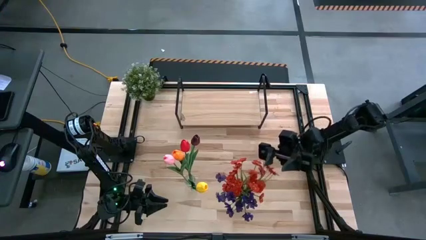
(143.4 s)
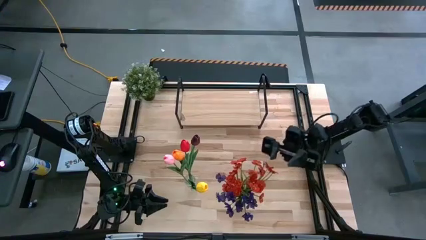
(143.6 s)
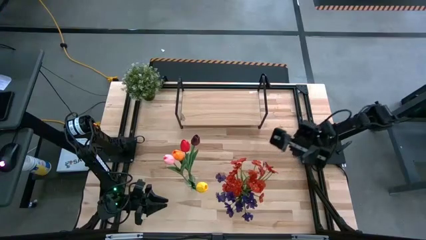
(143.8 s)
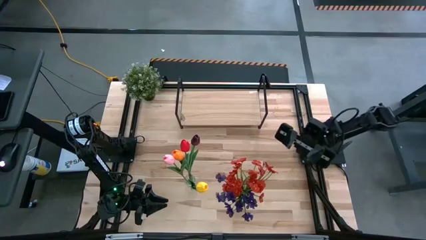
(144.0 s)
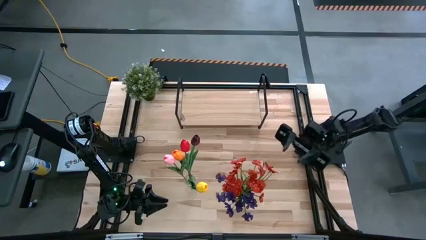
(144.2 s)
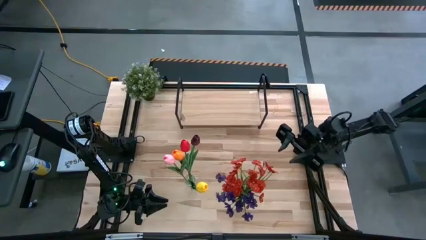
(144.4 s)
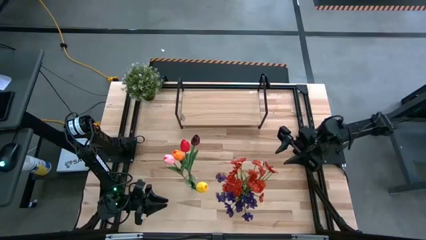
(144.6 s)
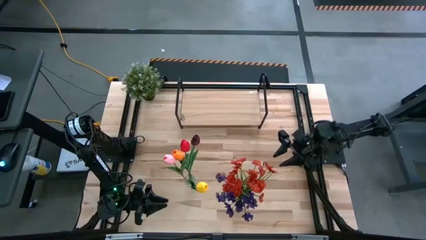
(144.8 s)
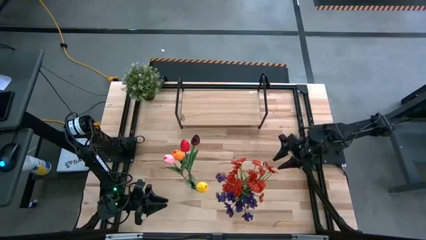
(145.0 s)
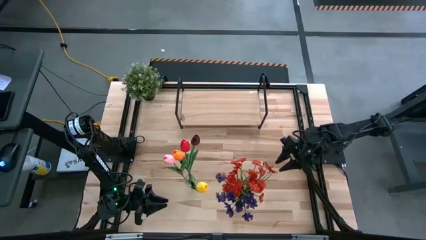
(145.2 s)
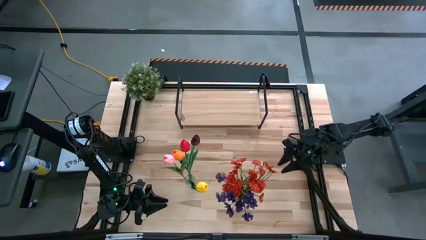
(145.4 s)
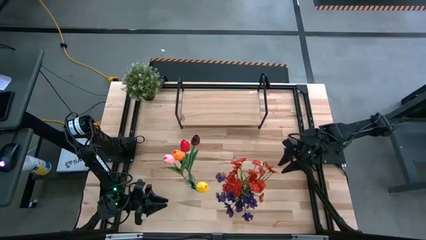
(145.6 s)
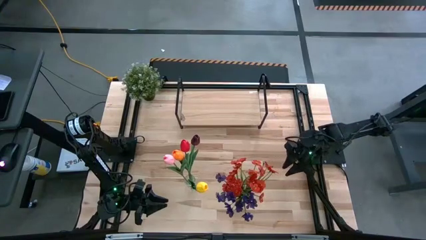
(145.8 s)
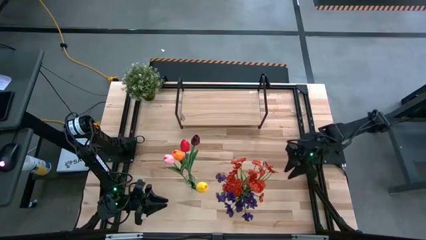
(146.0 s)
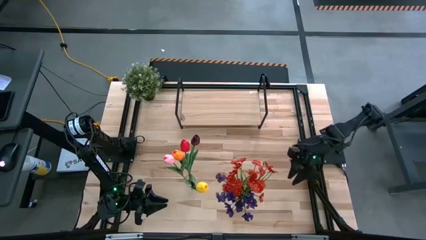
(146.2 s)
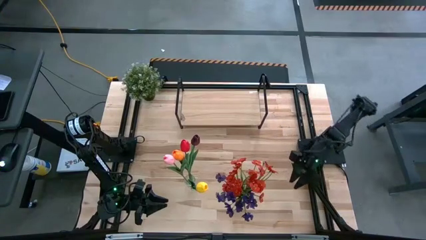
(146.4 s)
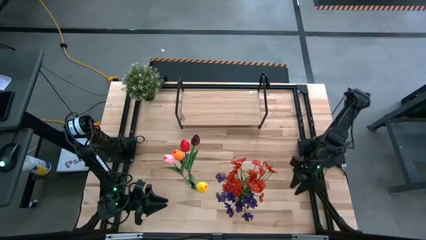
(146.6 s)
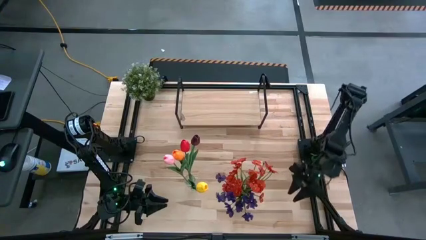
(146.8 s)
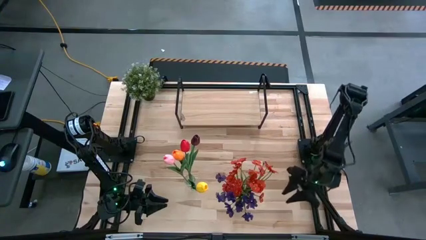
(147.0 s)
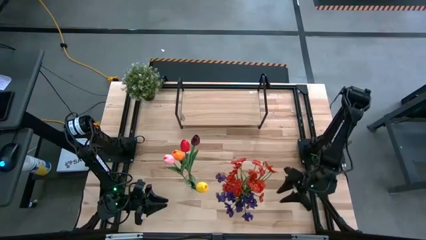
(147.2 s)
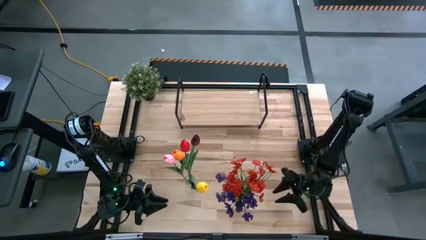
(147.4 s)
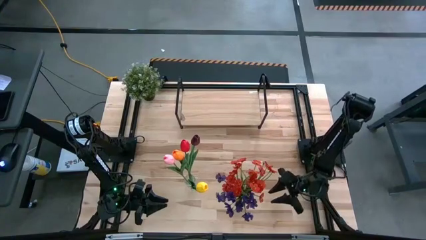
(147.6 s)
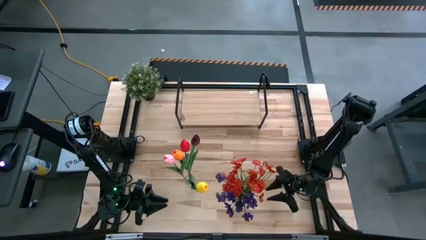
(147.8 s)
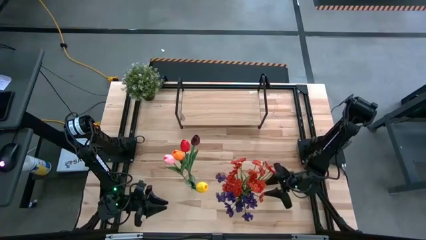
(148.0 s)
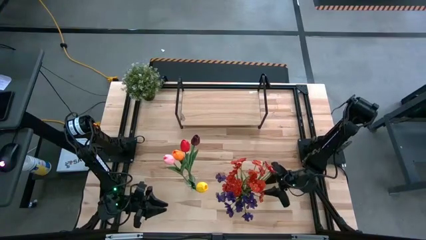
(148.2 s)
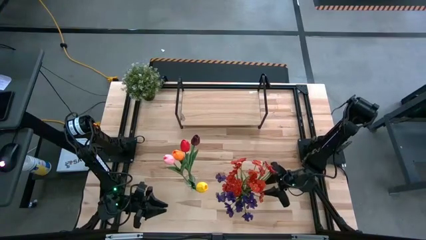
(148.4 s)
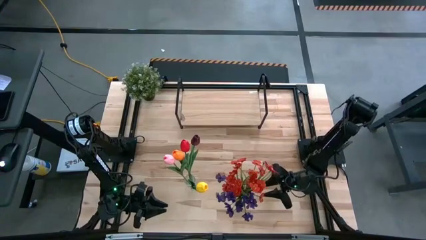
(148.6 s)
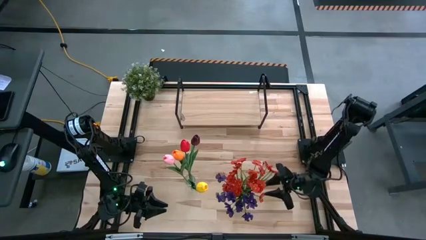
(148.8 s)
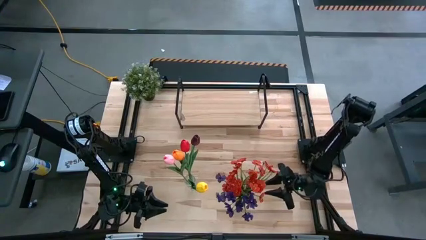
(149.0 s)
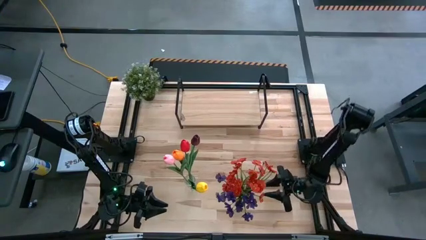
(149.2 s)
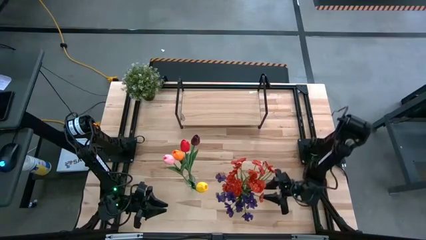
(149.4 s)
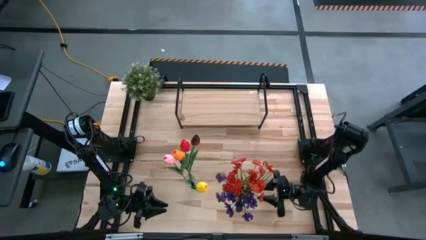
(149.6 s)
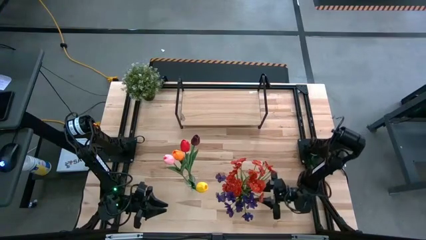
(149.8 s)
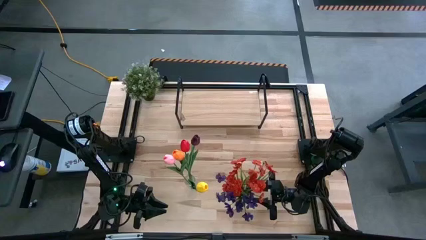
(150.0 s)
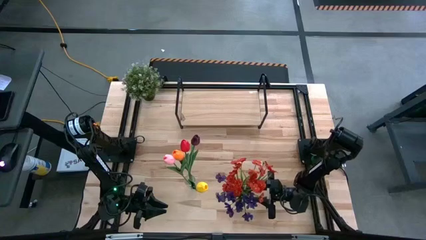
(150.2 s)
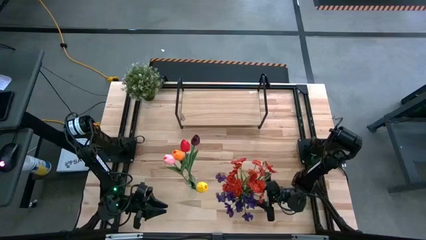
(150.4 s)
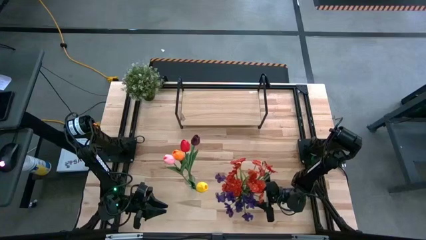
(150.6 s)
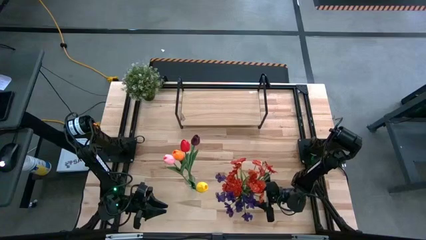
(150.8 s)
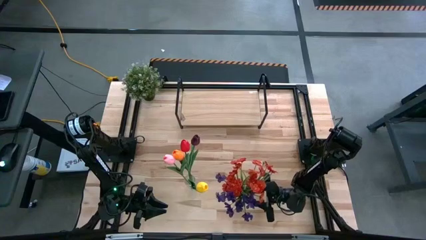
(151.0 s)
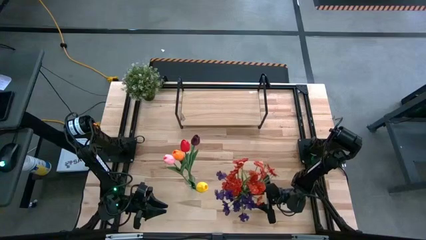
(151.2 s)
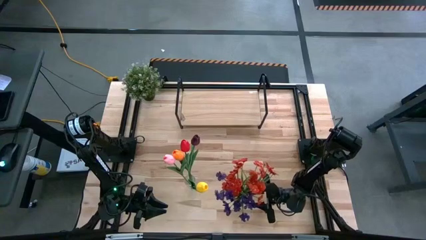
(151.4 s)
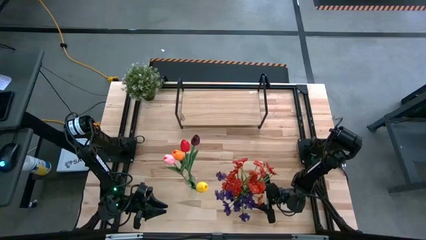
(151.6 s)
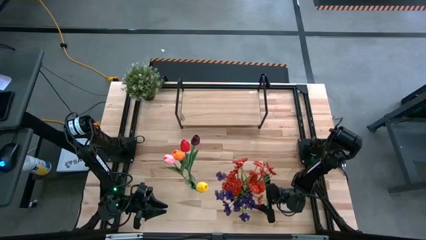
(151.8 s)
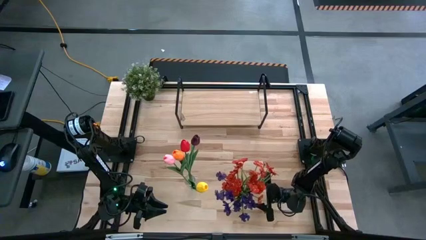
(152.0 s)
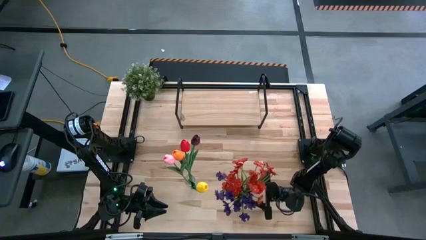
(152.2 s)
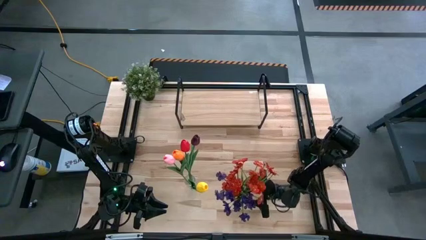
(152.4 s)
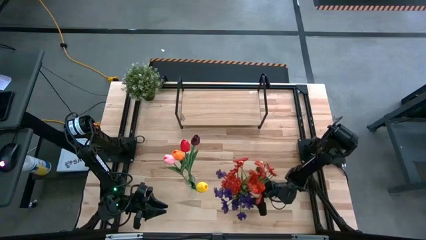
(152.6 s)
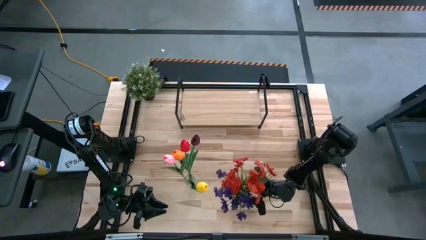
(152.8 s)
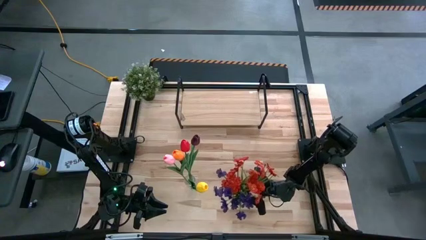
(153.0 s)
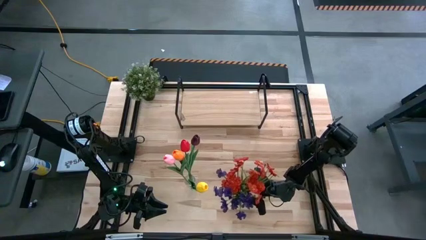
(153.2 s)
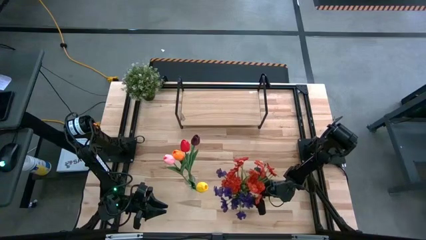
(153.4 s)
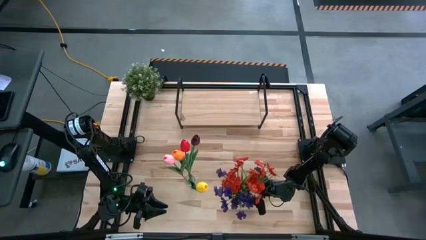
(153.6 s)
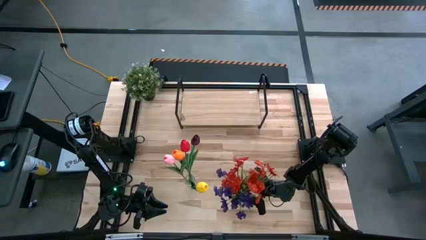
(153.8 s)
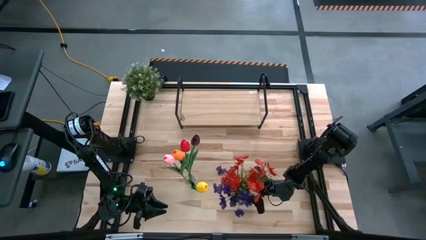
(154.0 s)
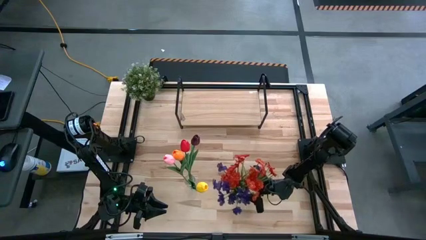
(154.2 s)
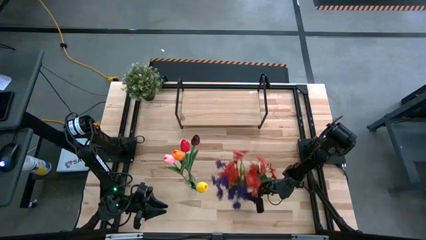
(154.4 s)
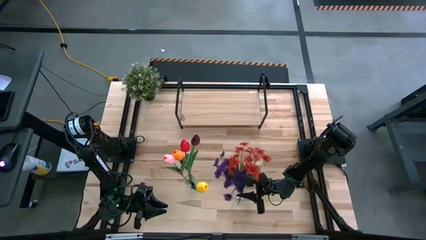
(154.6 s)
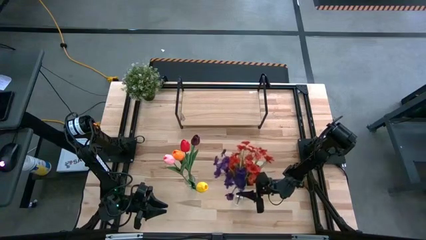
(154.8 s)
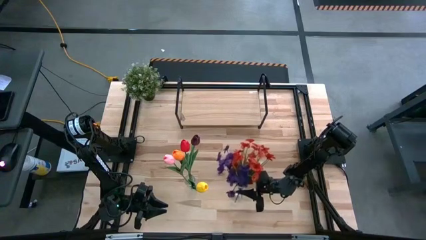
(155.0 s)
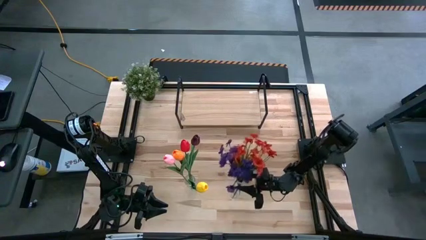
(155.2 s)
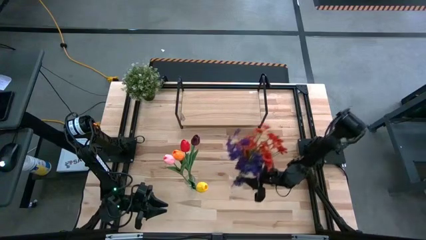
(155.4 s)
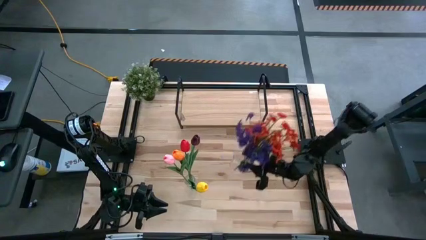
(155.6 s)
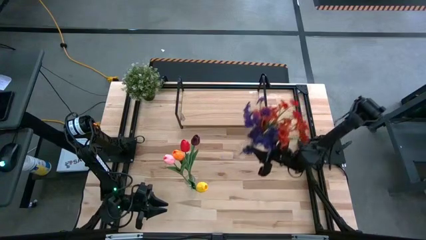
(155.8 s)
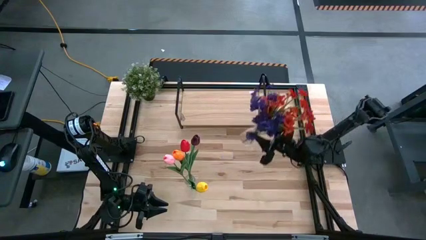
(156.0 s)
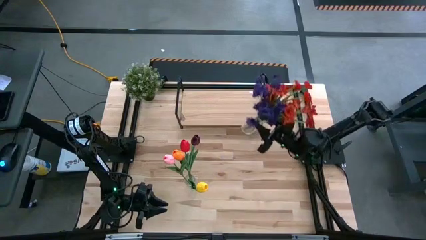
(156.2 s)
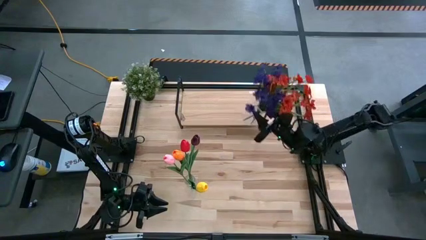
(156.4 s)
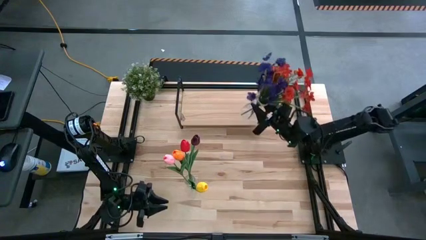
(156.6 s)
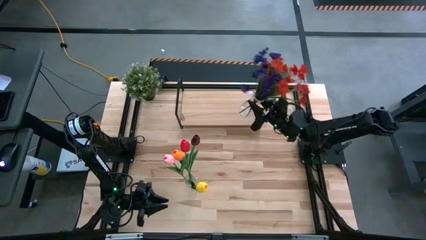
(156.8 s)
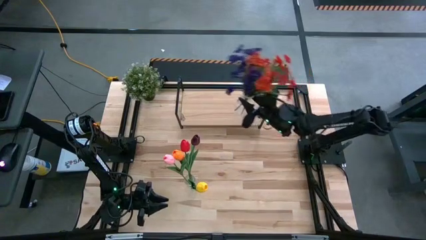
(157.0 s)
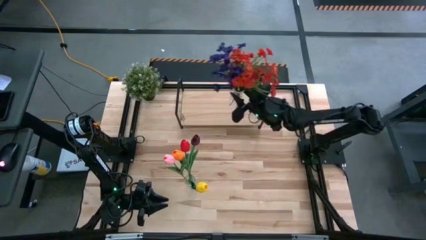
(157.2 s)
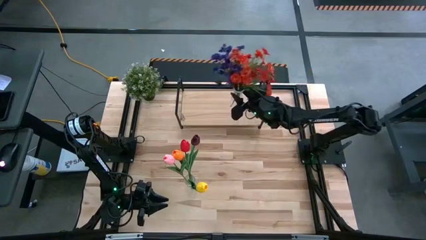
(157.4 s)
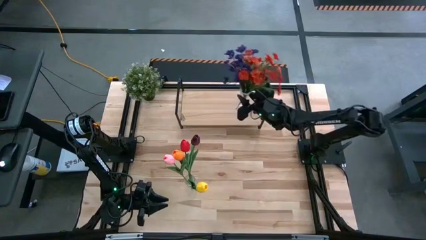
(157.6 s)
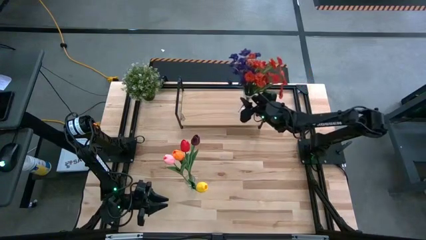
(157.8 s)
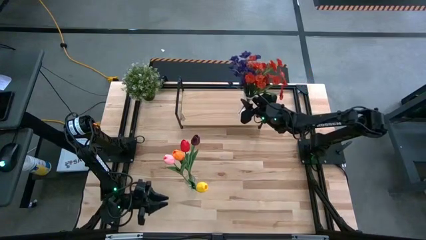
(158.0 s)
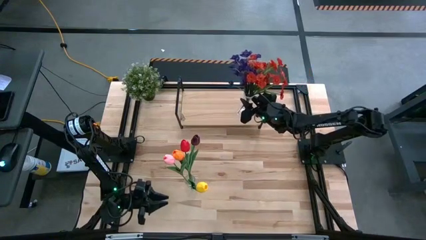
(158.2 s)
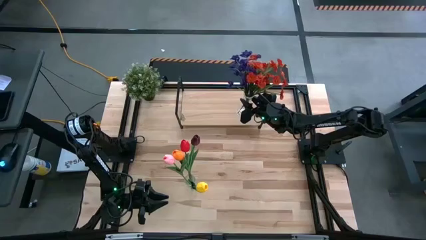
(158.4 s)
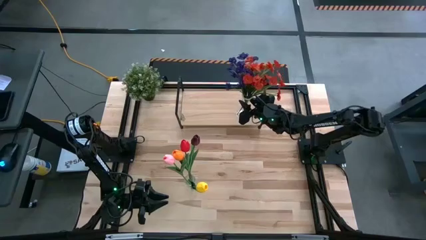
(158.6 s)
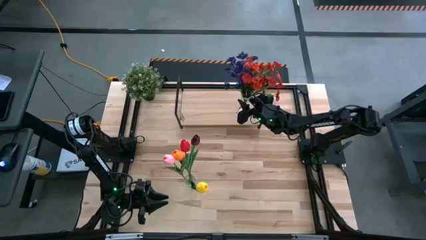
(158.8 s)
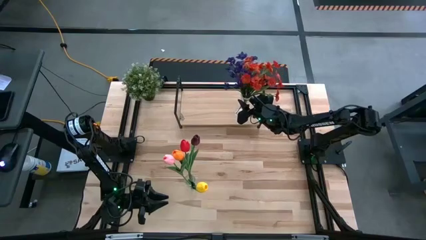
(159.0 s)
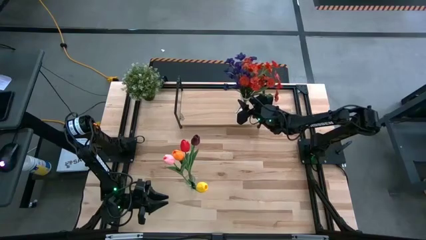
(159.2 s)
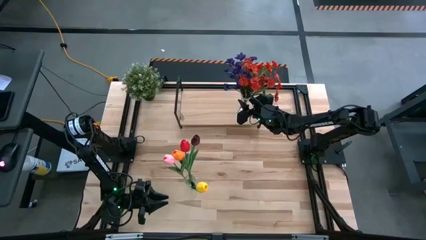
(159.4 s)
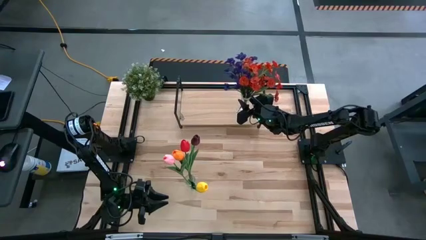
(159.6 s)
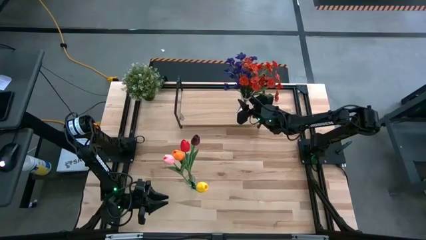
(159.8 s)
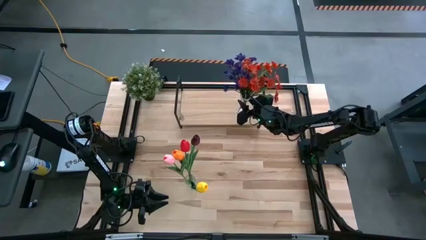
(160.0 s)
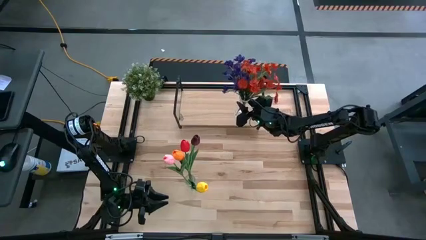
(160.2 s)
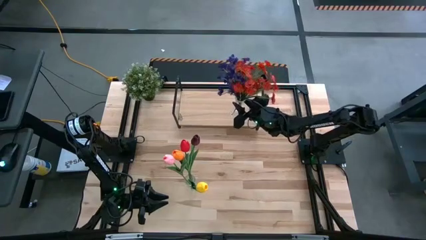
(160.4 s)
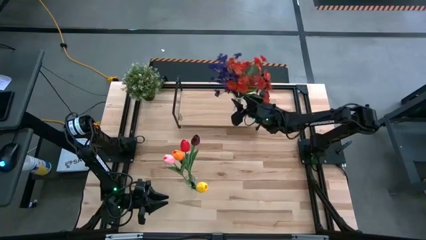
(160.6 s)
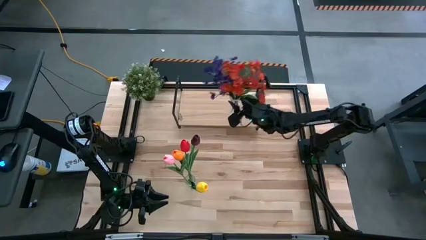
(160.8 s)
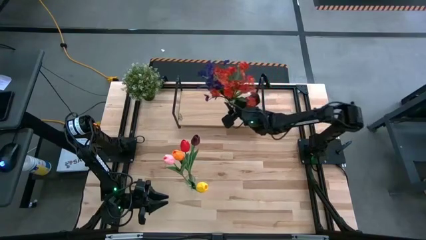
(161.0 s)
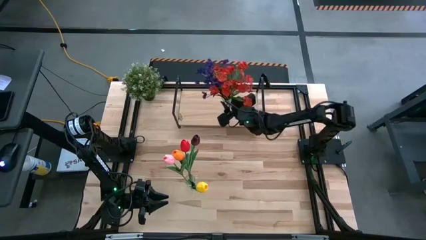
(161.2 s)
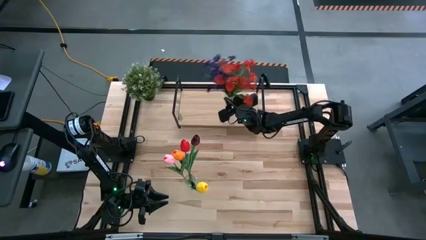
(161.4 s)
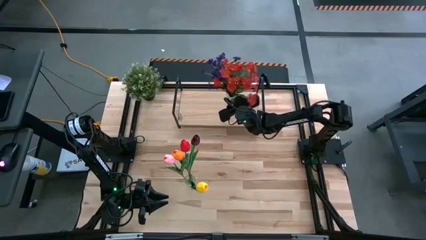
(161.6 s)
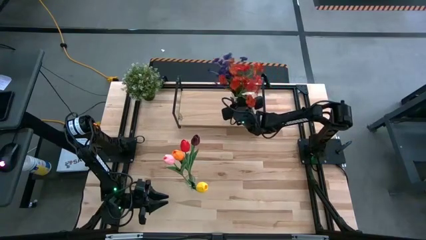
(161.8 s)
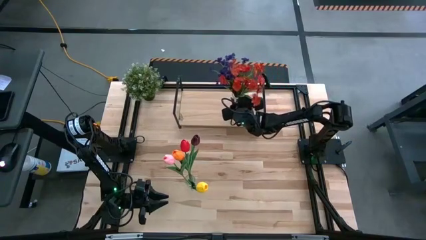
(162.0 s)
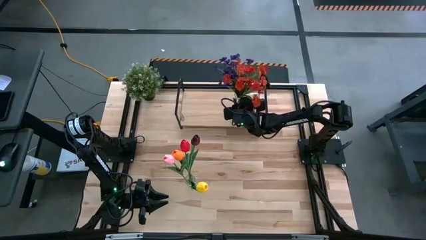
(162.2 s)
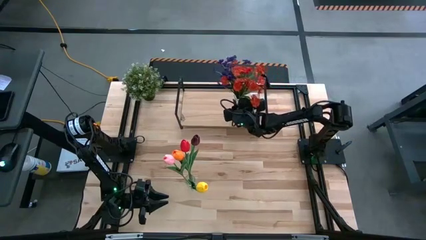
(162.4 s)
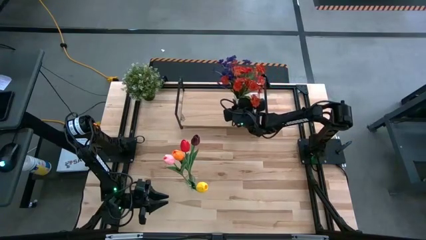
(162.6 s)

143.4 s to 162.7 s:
Task: Pick and place flowers into a vace then onto a shelf
Put the right transparent vase with the flowers on the shelf
